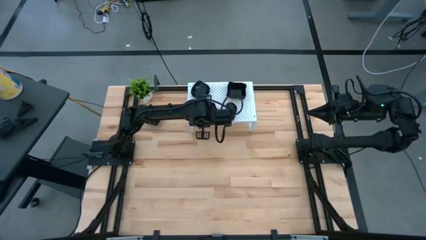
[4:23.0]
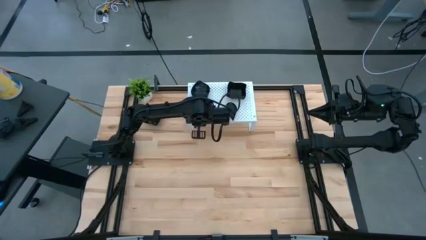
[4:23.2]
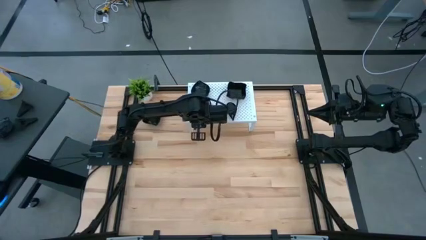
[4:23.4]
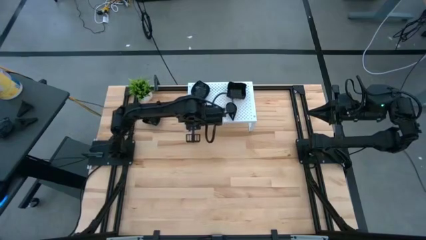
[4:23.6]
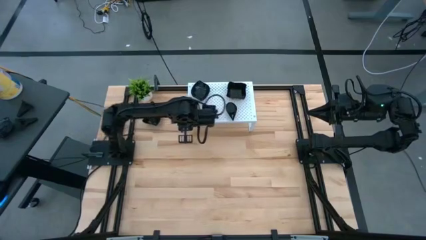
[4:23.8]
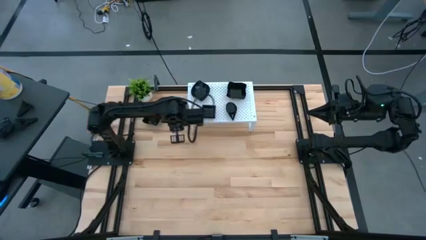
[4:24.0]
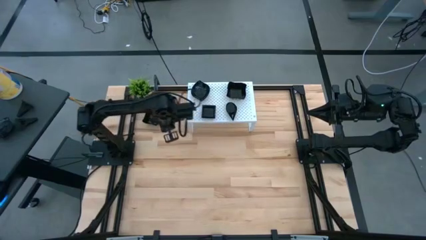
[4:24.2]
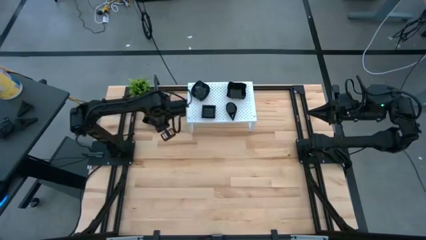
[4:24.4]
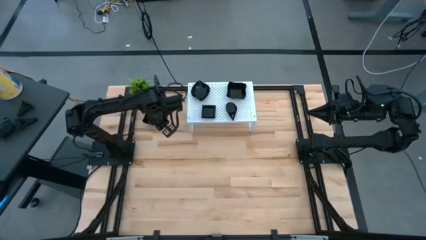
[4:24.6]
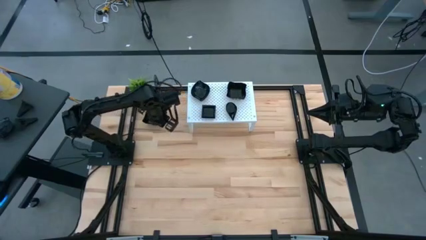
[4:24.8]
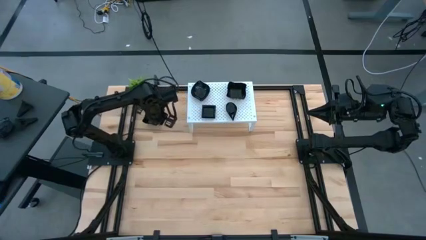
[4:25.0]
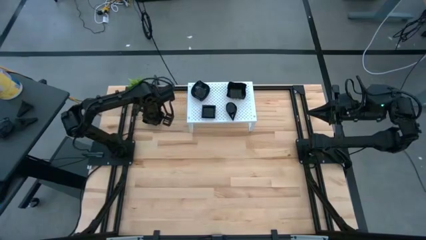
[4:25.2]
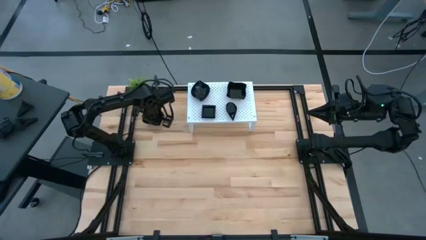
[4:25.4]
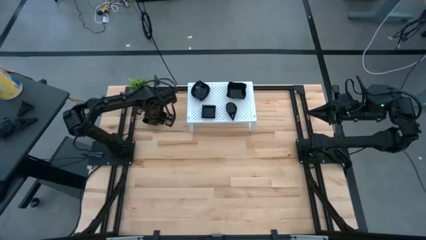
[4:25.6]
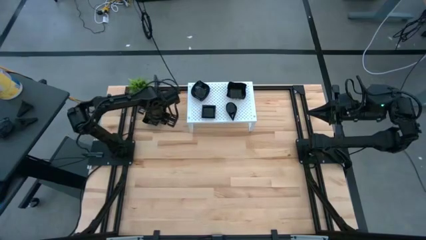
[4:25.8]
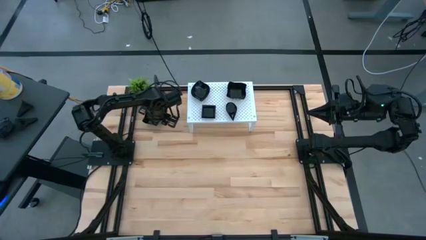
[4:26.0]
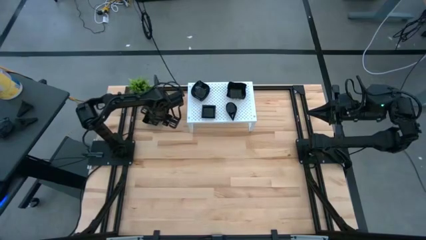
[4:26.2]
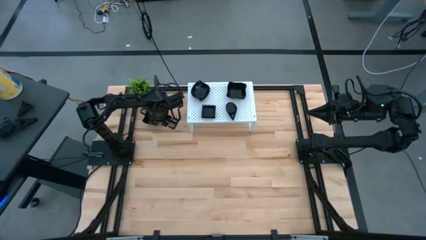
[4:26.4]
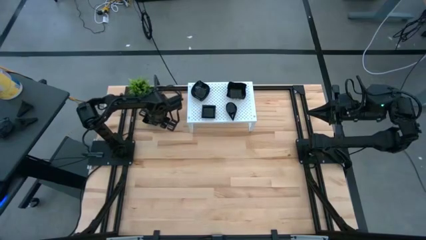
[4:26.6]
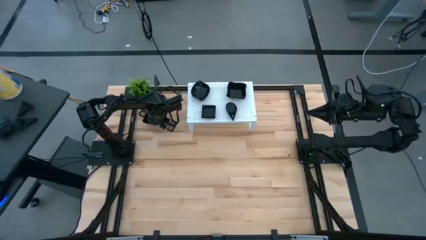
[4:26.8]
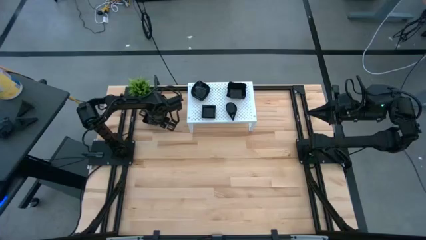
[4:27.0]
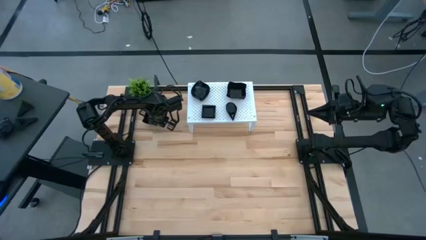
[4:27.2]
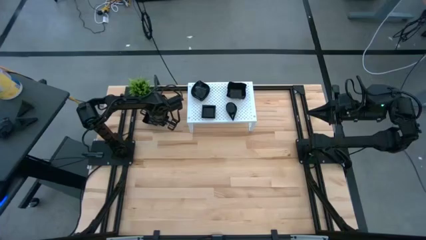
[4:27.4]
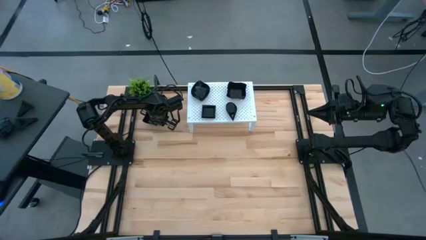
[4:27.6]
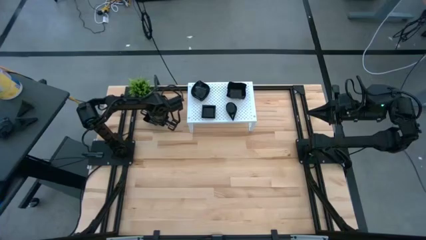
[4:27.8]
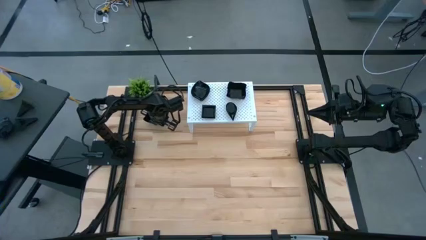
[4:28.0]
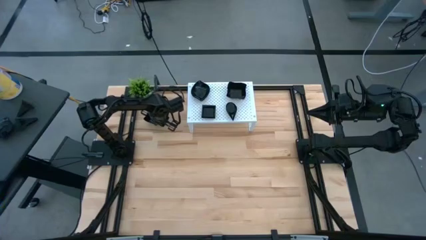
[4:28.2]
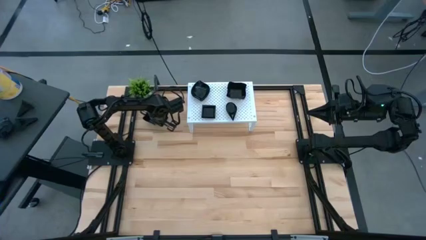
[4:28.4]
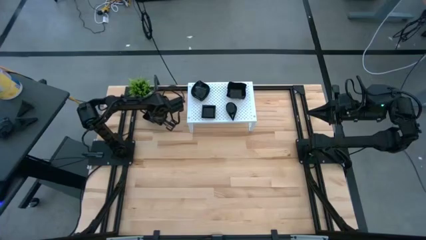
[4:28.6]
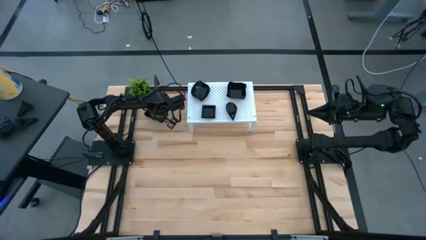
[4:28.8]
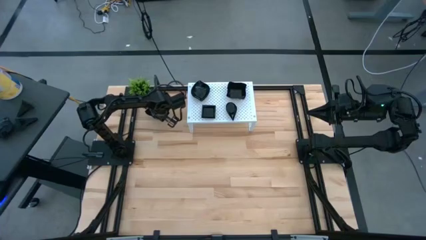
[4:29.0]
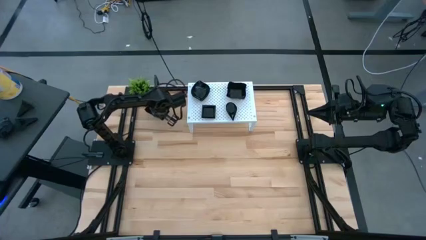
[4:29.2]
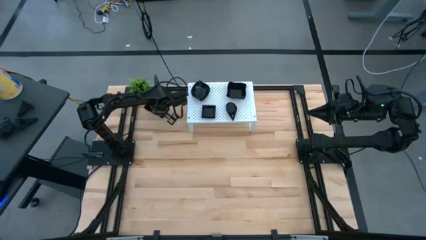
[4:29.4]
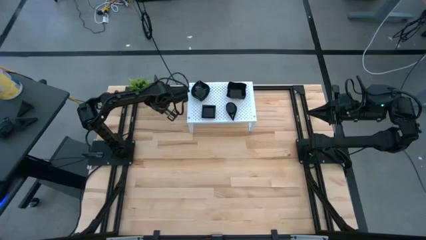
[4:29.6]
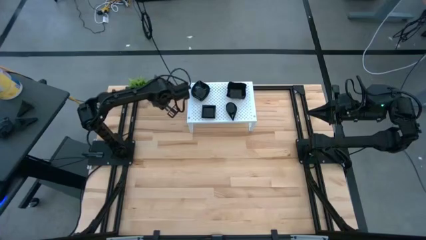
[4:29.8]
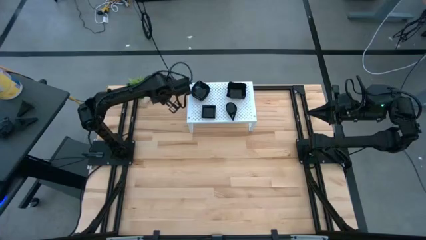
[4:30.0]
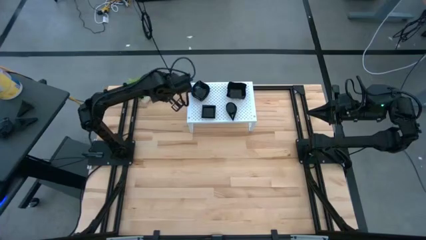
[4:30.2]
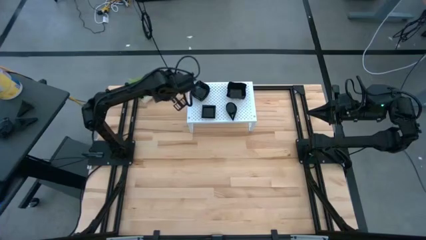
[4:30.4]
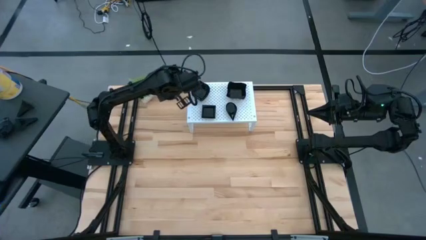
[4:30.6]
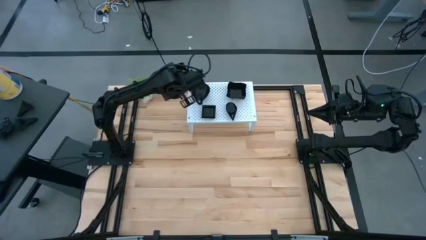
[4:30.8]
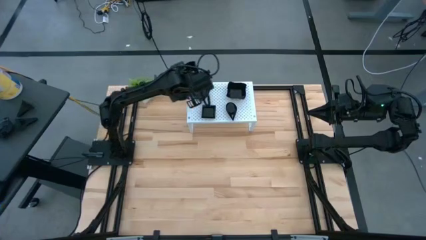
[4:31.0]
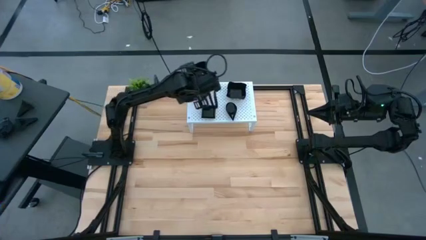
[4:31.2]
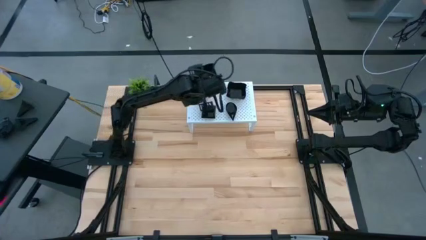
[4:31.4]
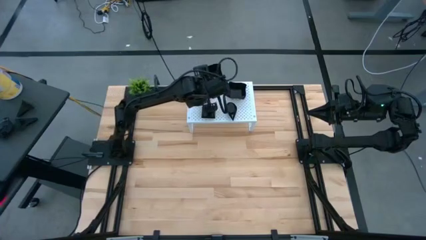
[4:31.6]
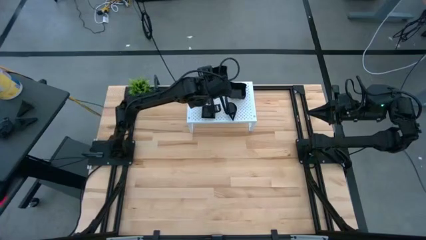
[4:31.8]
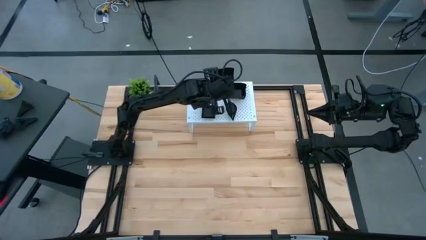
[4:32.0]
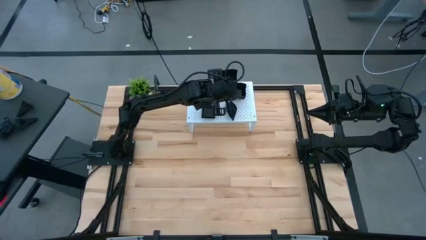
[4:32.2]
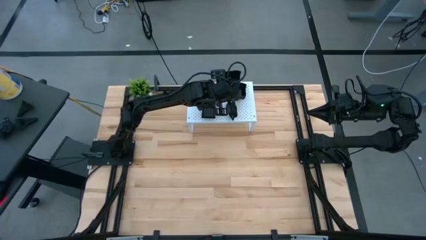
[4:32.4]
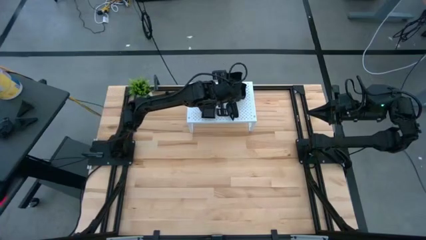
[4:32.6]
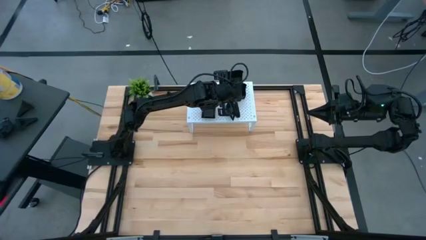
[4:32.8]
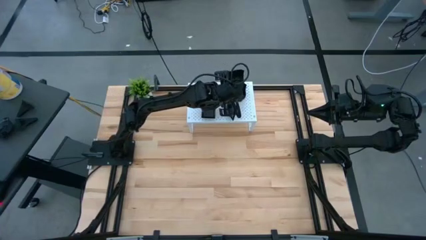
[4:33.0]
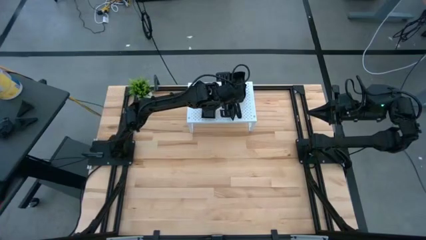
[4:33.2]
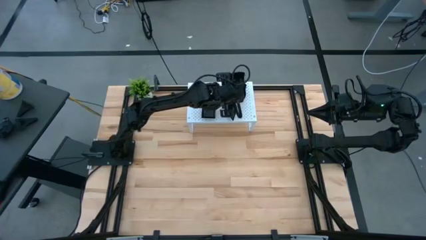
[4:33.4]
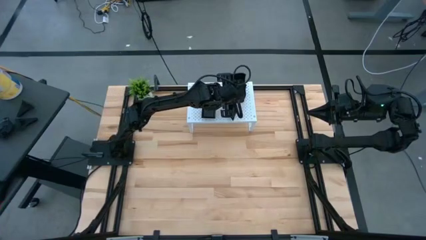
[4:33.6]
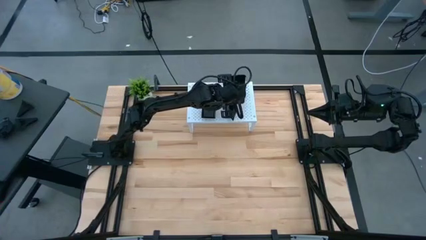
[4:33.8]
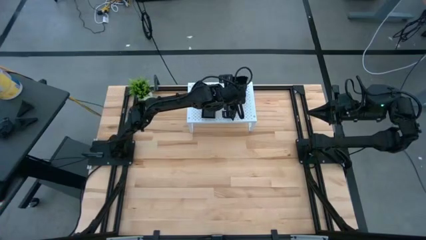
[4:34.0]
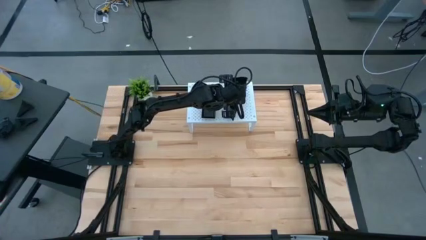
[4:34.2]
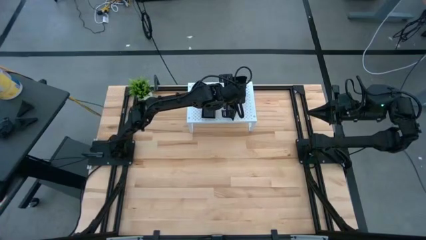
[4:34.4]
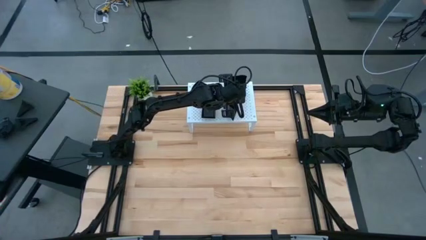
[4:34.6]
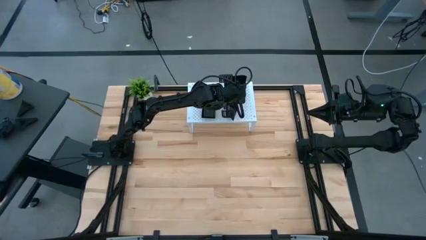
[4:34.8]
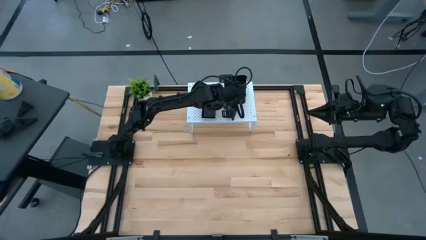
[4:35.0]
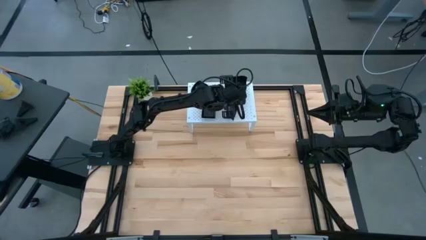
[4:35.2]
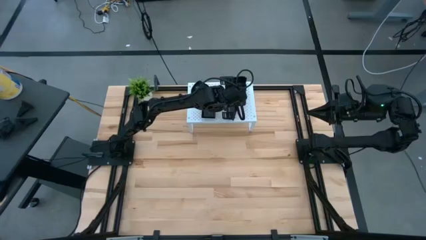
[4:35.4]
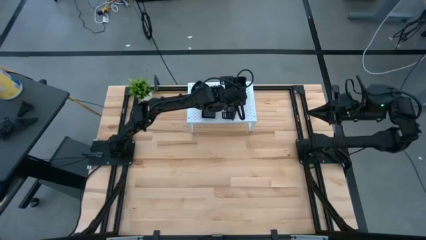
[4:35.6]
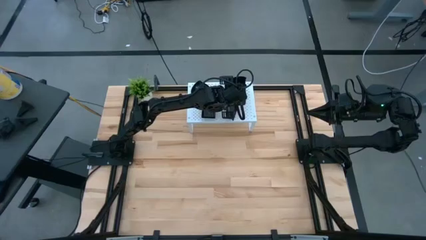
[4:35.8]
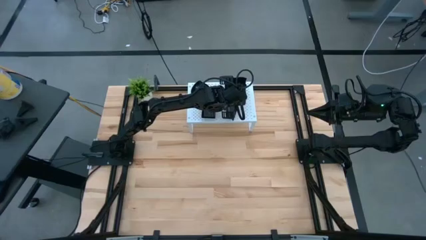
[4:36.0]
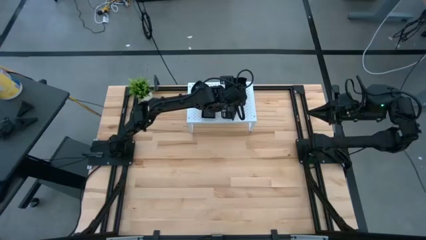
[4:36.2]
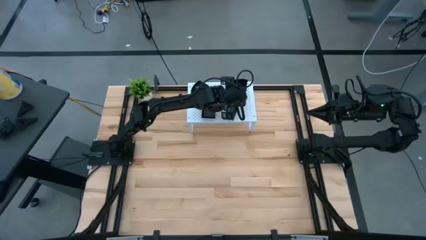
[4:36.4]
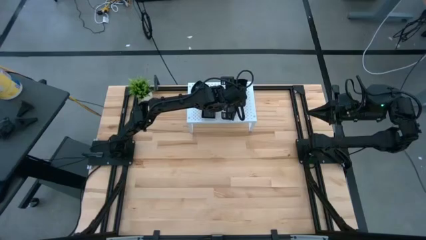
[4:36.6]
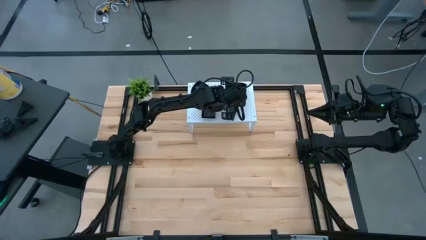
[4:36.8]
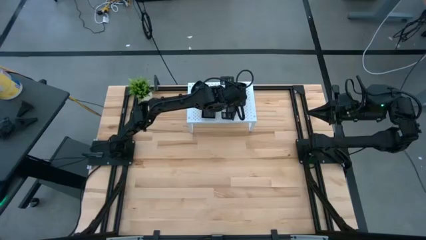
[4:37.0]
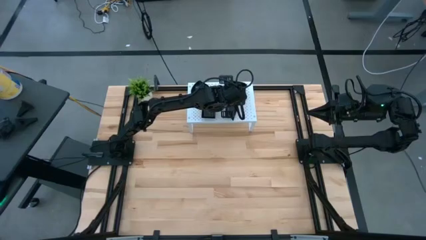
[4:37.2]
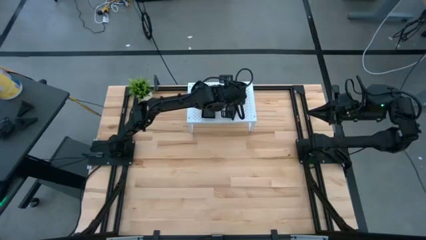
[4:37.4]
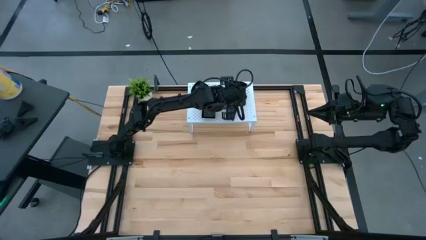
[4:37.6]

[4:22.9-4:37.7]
Task: Pick & Place Mini shaped plates
Stack the distorted square plate on top of the distorted square plate on the shelf
